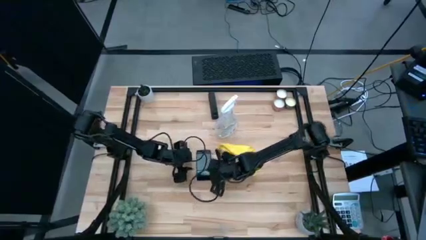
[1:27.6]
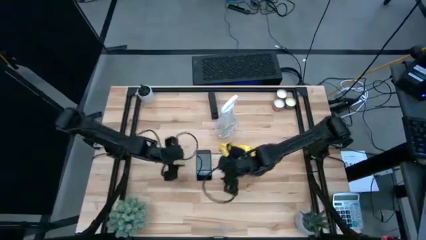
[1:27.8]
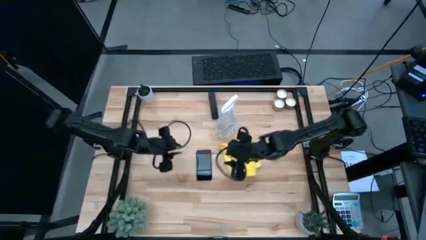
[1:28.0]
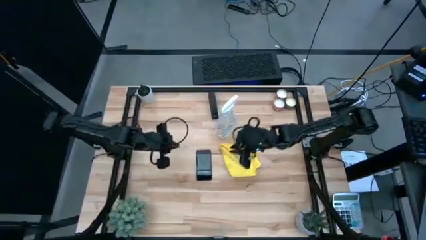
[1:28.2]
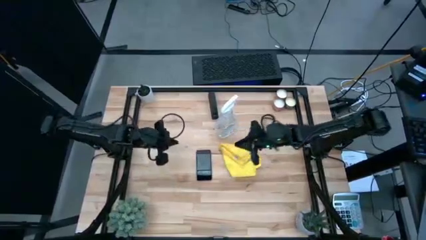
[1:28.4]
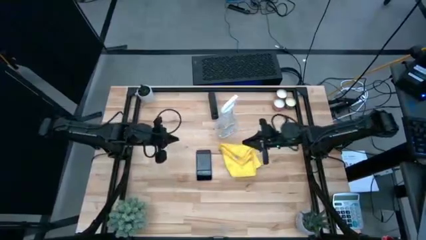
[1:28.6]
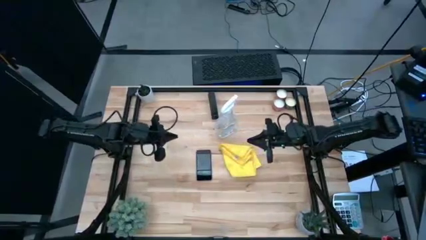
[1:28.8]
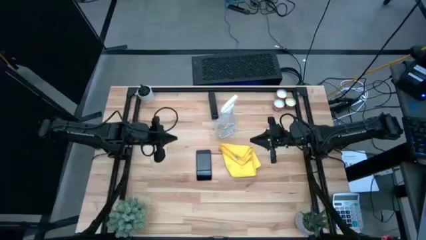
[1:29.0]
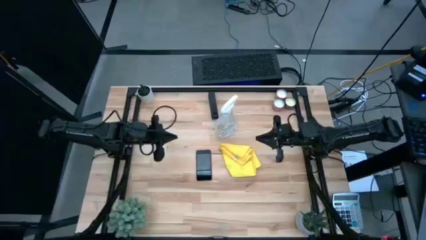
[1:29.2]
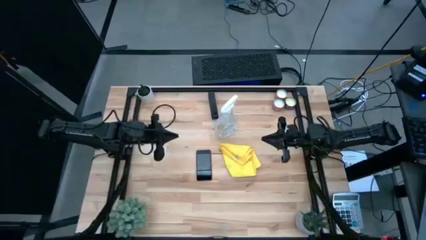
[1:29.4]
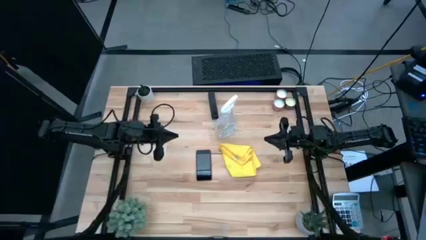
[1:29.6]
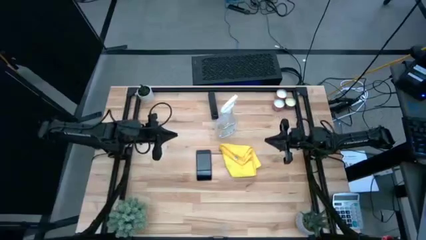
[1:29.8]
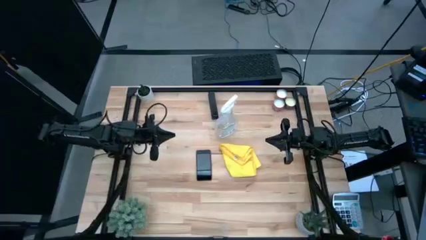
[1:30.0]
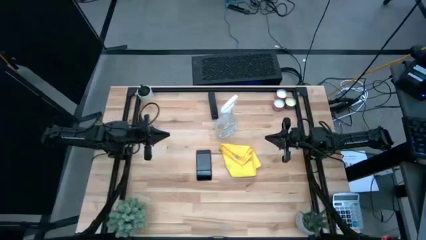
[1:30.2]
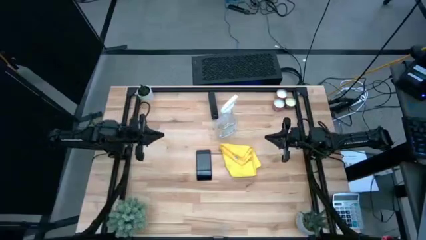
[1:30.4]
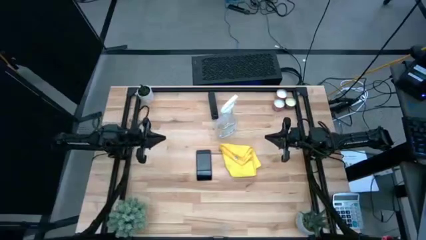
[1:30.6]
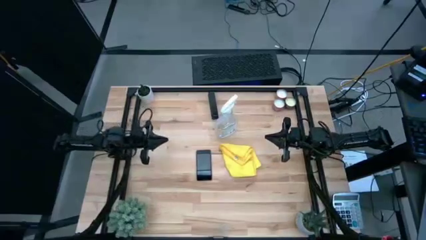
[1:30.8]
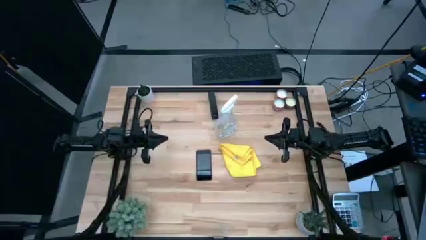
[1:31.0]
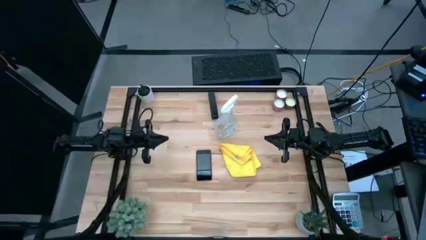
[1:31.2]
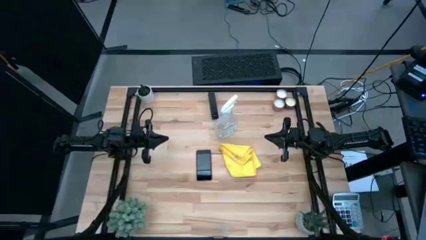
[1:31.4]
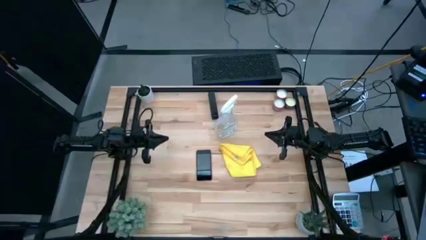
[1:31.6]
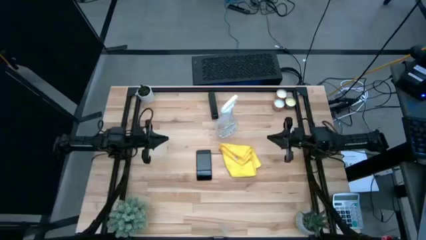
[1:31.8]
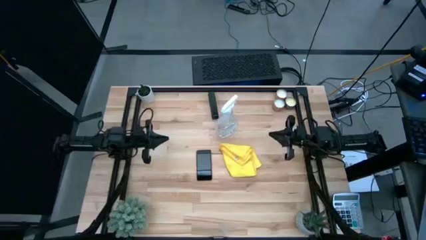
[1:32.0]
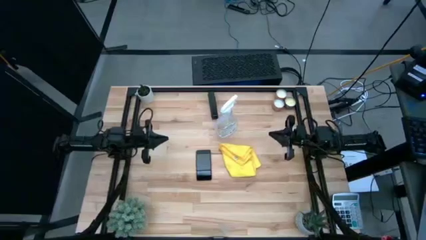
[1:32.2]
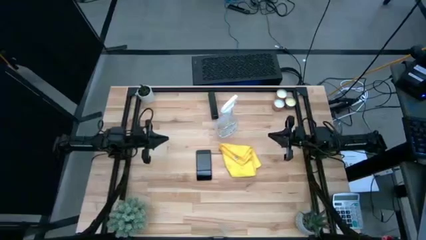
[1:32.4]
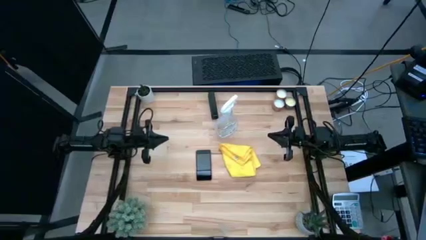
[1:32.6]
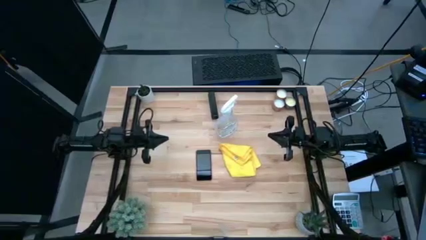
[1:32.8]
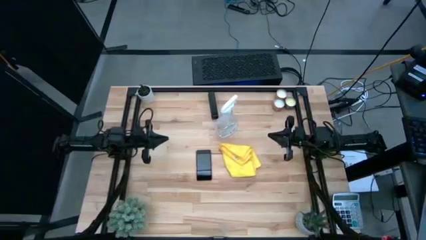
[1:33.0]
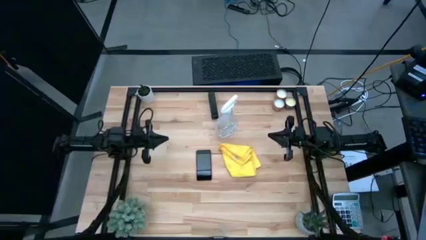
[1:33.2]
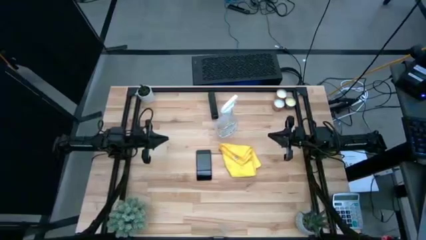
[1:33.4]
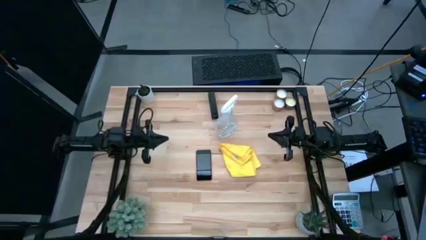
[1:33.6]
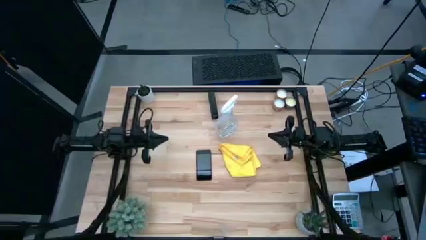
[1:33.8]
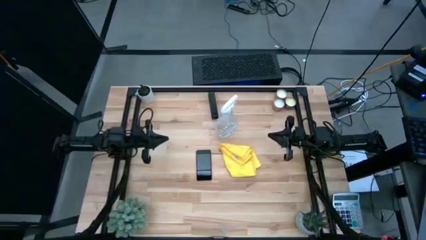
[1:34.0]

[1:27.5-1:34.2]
Task: Apply microfiber cloth
Return to Home Position

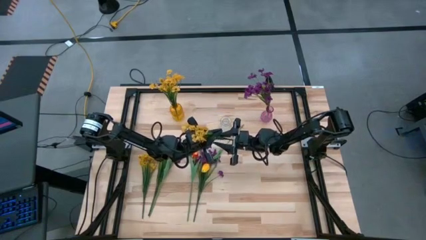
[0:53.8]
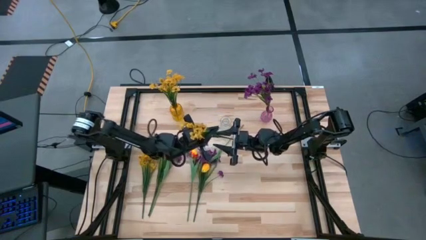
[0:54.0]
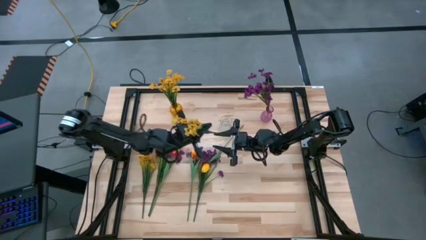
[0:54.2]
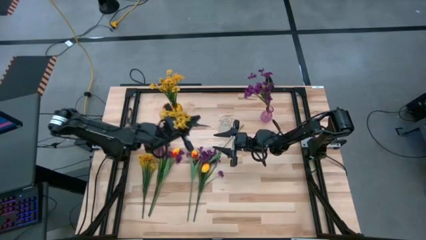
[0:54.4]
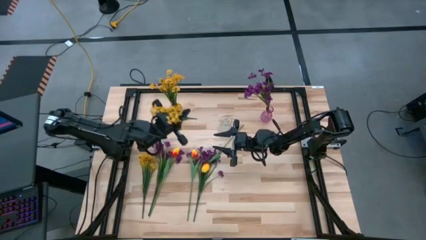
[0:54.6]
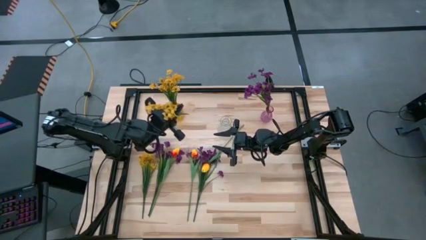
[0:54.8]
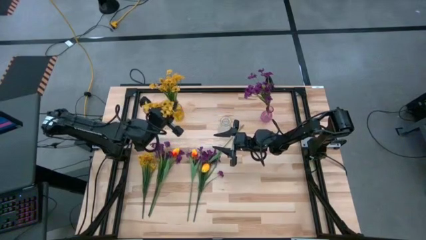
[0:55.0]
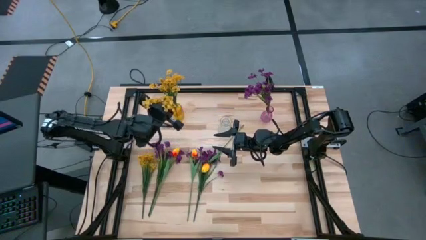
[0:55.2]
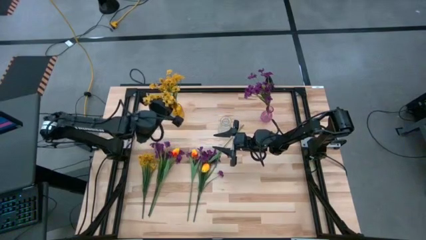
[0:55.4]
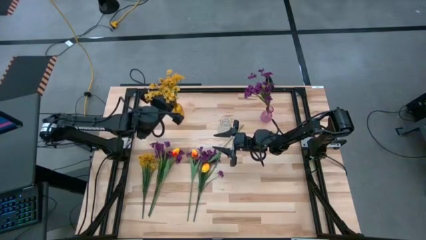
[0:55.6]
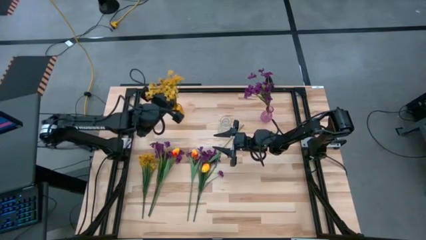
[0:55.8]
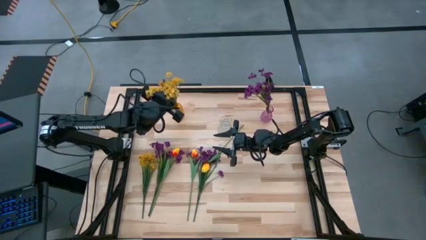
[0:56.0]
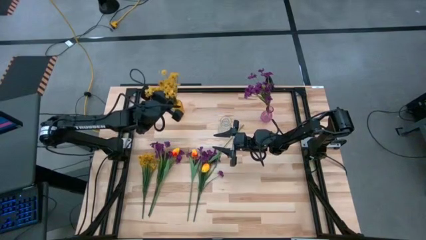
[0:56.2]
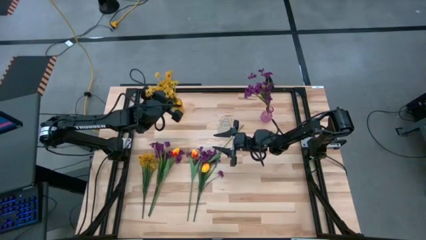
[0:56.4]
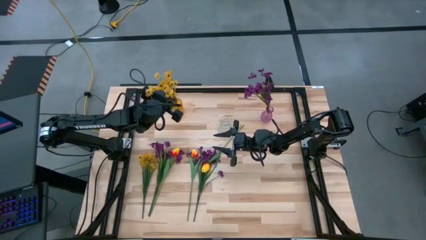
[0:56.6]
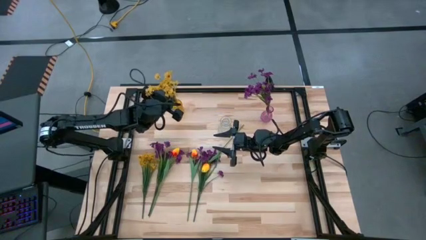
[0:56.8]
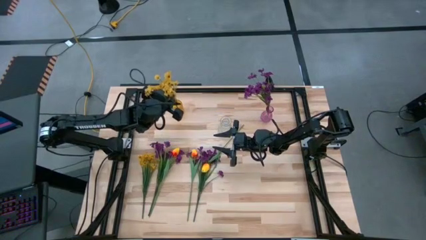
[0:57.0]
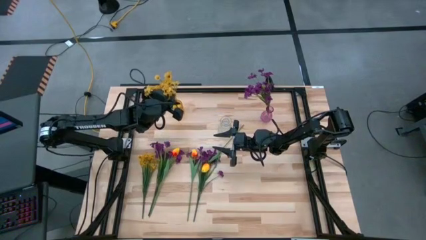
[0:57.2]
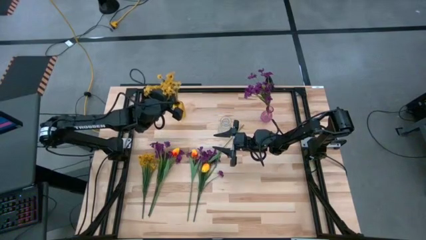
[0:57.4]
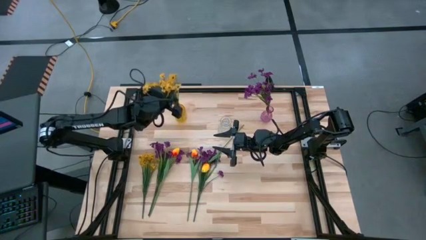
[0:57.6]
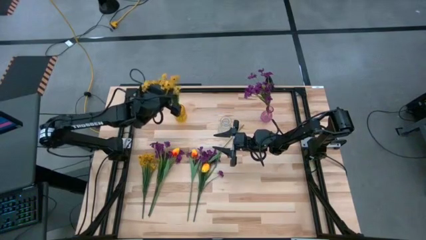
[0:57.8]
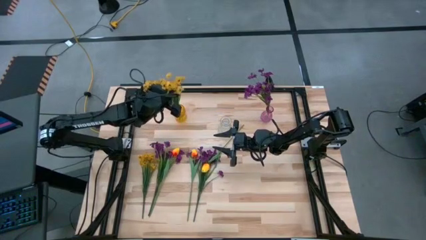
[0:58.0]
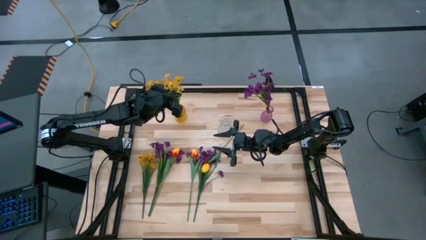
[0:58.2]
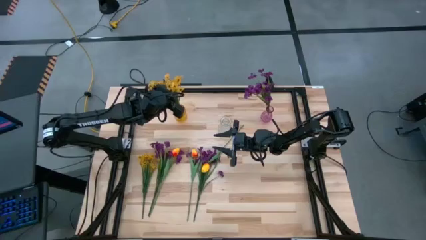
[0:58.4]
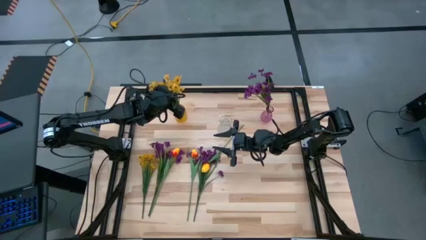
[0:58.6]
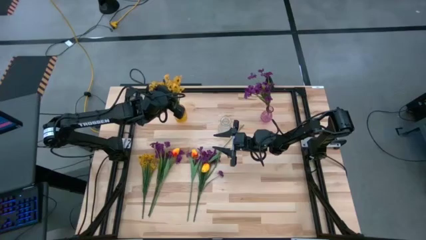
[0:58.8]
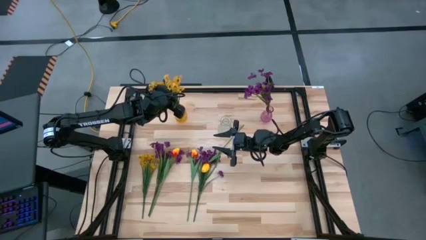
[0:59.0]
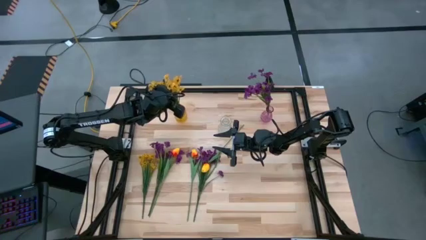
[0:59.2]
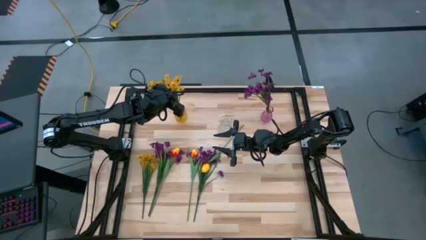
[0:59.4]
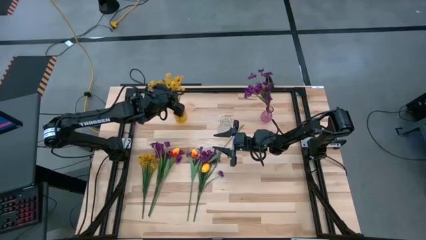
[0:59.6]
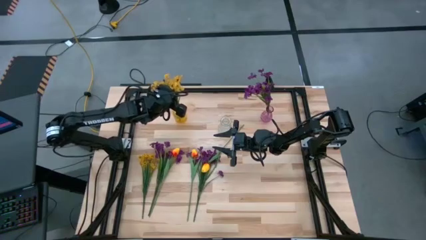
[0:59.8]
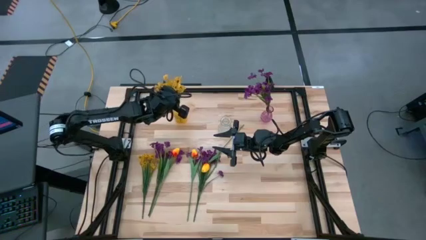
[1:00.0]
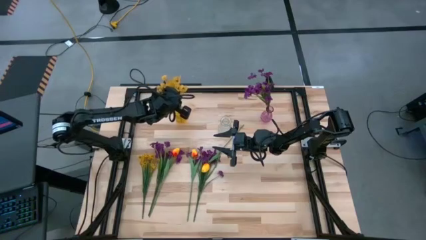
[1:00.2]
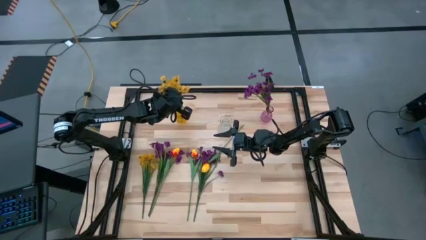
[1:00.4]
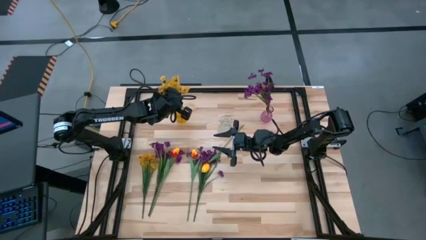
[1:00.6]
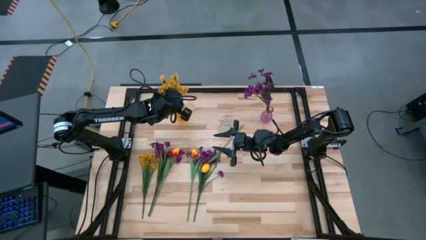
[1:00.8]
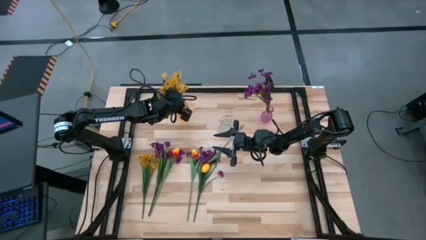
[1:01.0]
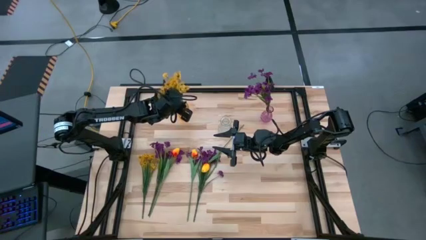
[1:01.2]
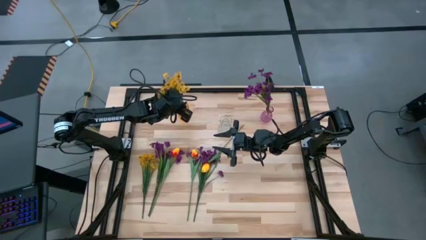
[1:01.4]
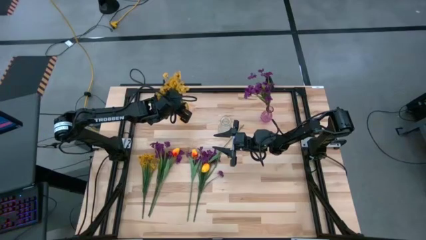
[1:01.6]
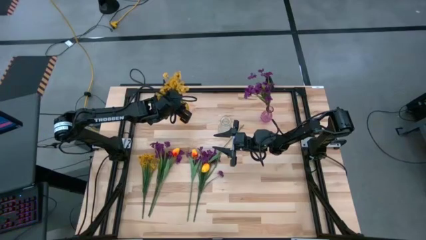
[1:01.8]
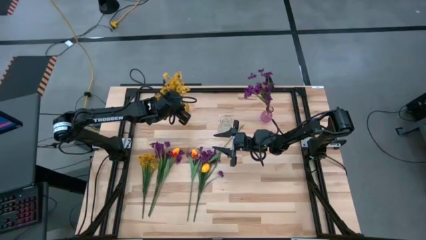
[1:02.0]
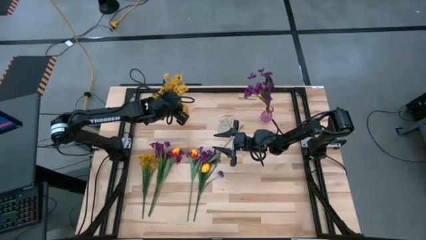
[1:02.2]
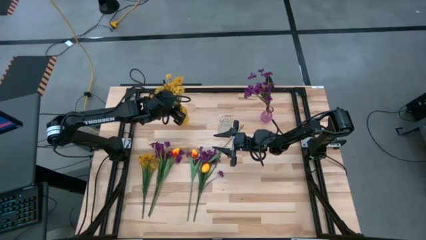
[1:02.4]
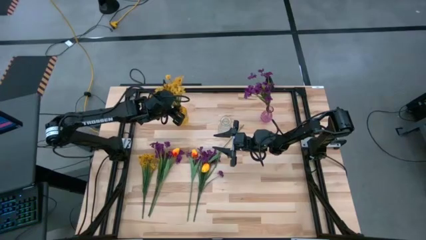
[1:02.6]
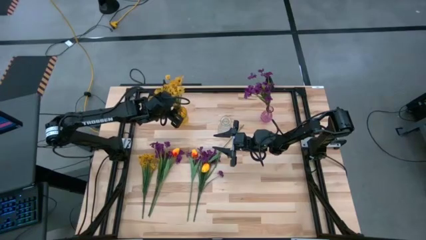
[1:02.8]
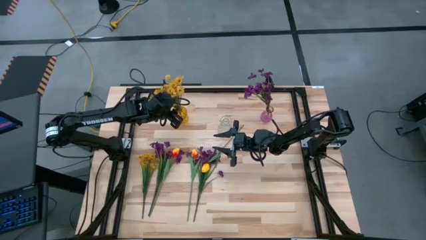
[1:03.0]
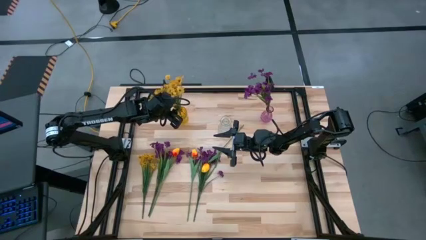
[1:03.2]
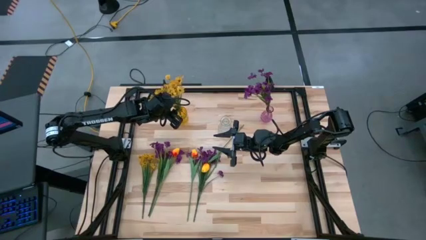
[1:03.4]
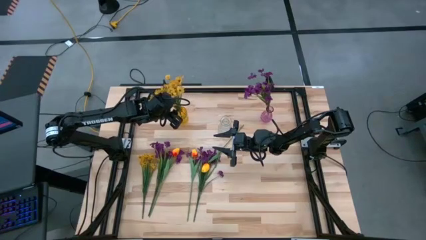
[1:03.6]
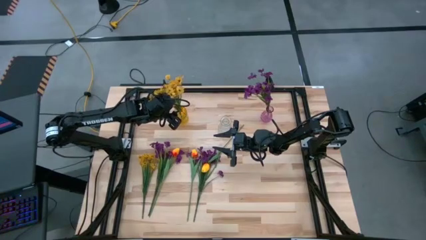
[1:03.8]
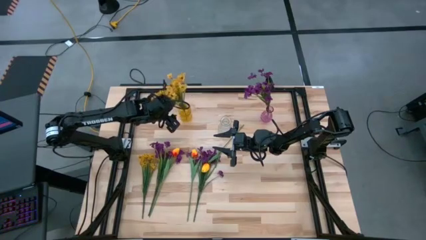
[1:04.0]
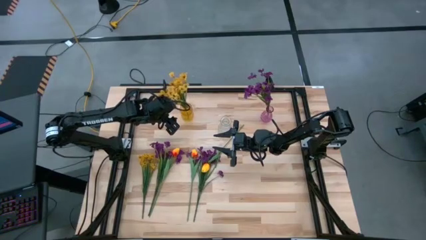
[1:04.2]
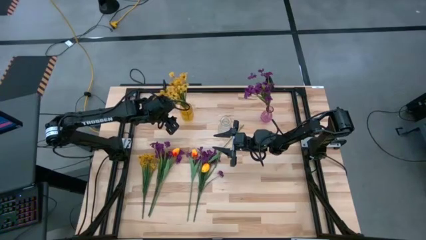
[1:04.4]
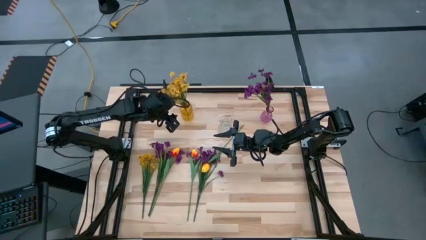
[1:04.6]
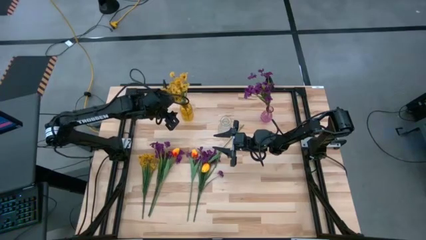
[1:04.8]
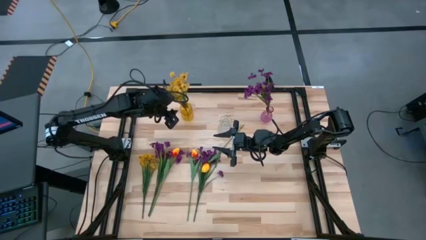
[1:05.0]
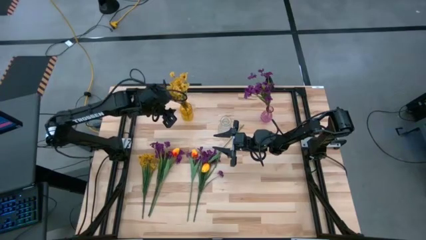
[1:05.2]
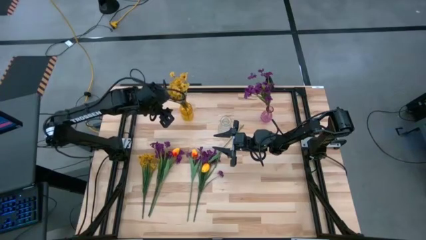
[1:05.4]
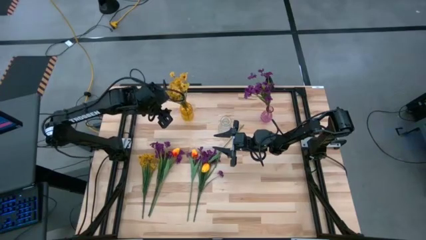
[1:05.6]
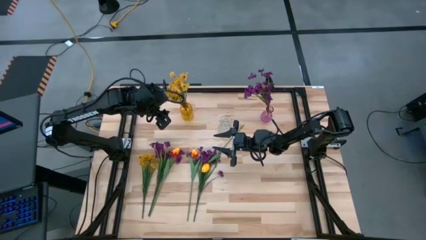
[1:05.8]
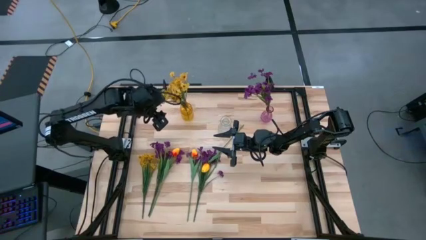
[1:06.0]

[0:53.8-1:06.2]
Task: Sort flowers into vase by color
Put the yellow flowers into the yellow vase
